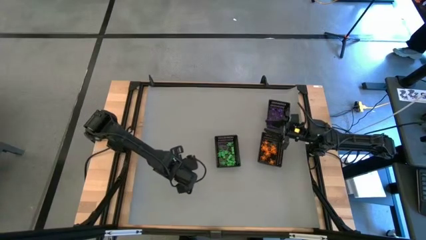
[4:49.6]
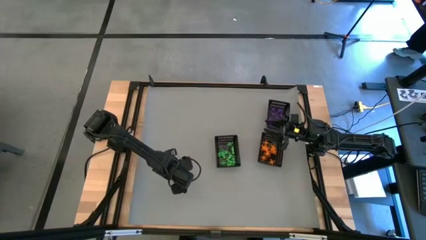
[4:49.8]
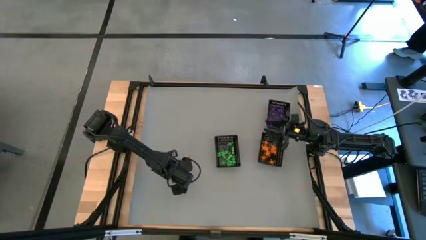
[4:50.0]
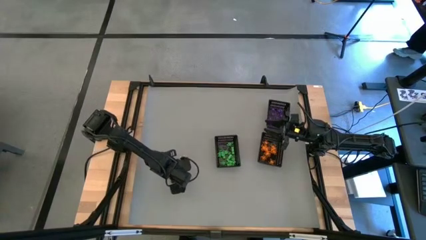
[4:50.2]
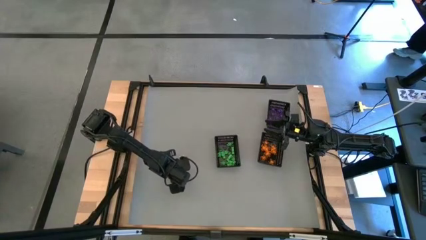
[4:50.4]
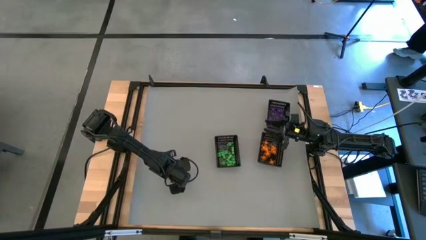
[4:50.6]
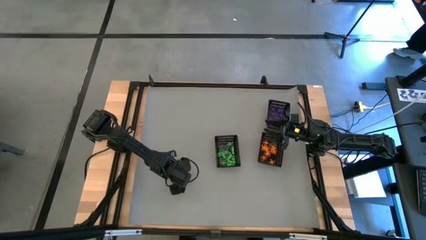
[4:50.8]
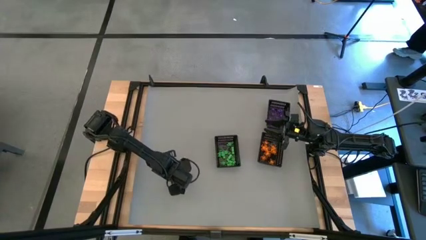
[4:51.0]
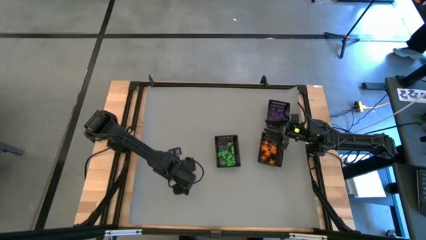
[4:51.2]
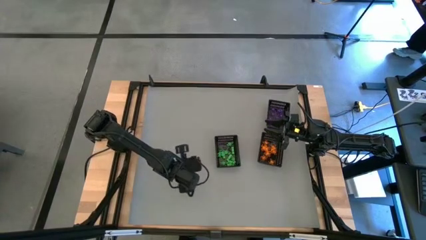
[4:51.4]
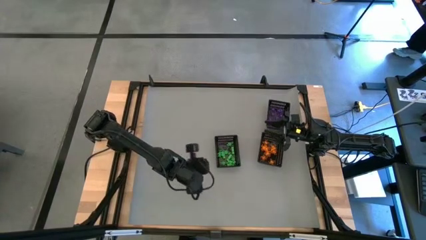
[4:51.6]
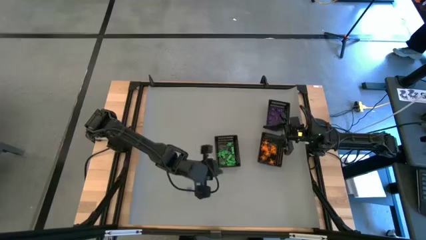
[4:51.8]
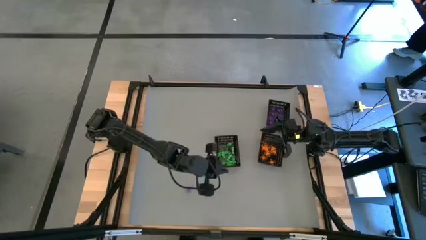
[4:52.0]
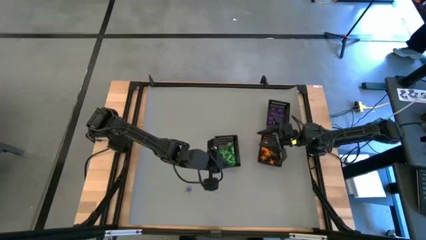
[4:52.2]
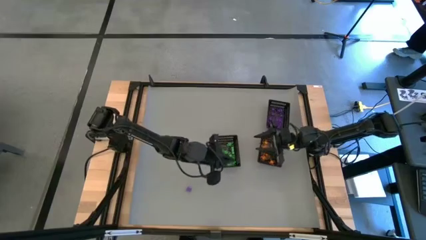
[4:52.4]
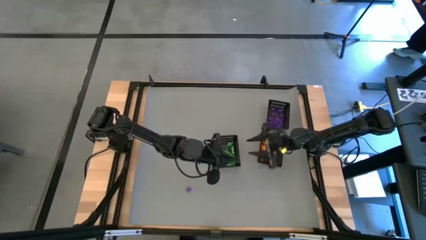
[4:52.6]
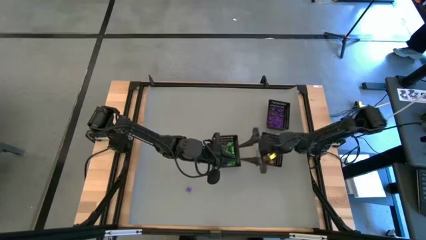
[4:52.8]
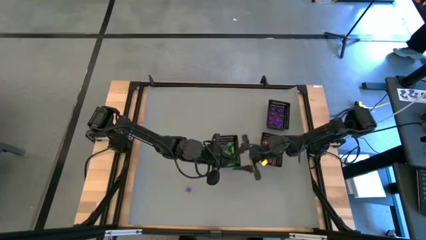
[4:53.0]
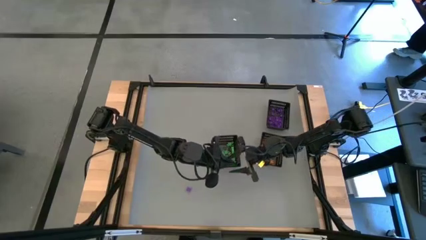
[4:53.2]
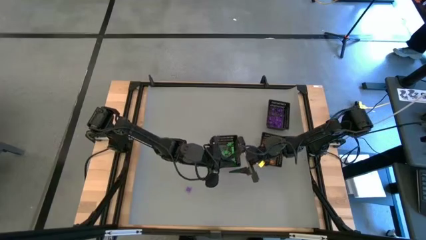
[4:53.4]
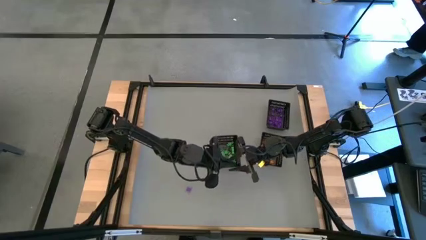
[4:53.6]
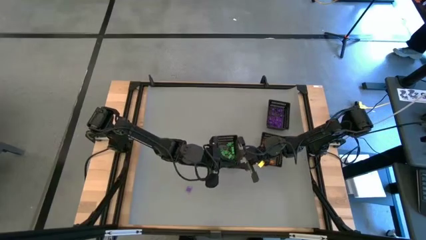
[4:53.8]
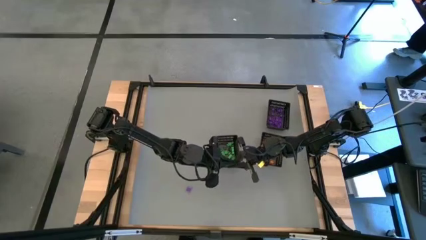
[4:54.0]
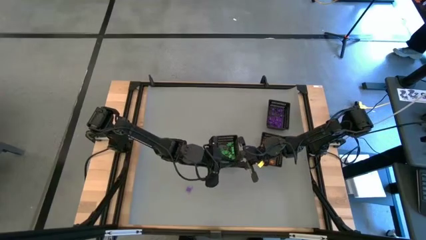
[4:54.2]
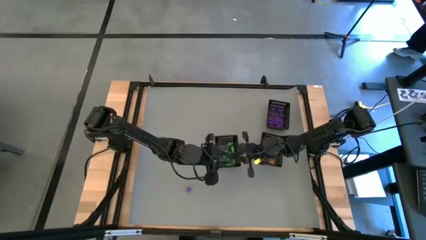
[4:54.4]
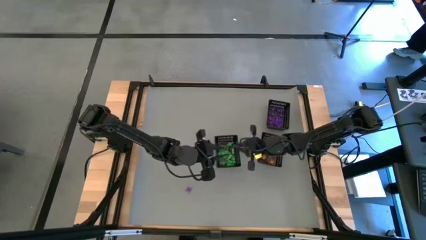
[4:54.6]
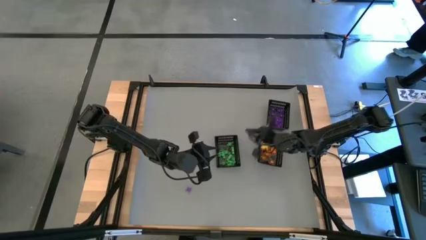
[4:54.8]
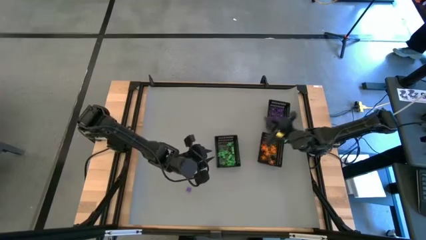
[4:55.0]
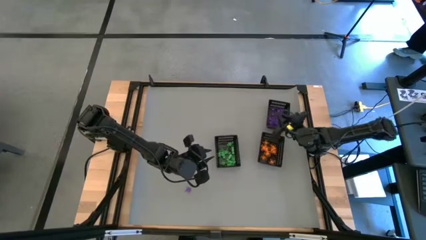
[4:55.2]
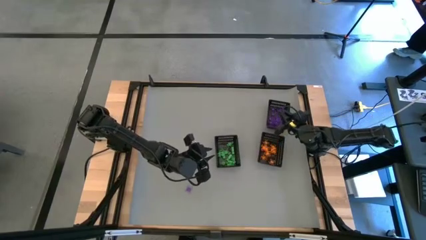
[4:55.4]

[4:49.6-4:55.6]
Task: Sort Halloween decoration
Put the bottom purple spider toy into the top bin

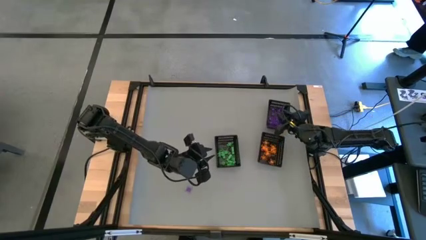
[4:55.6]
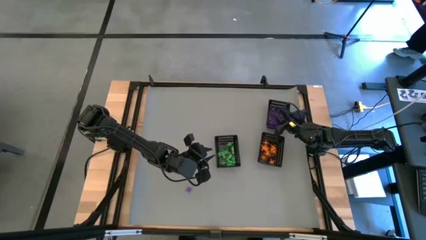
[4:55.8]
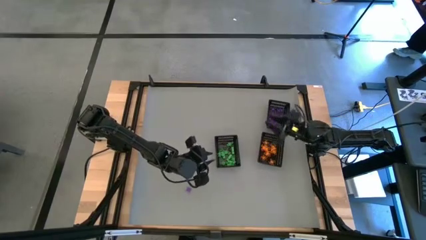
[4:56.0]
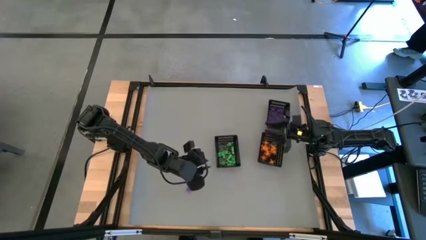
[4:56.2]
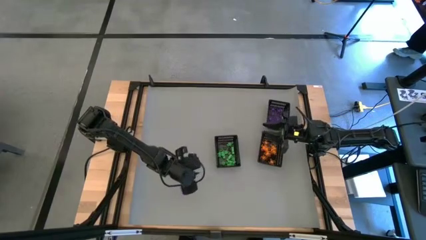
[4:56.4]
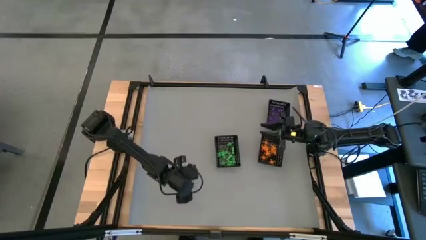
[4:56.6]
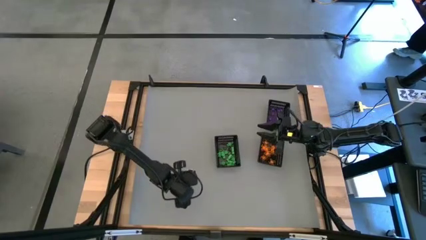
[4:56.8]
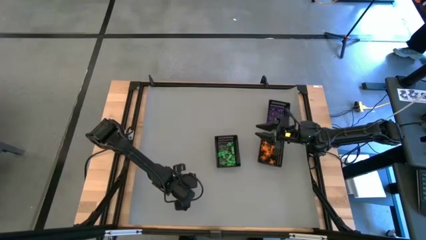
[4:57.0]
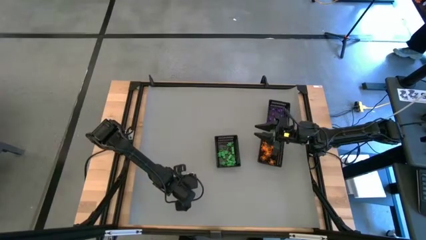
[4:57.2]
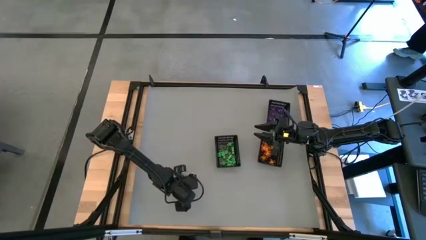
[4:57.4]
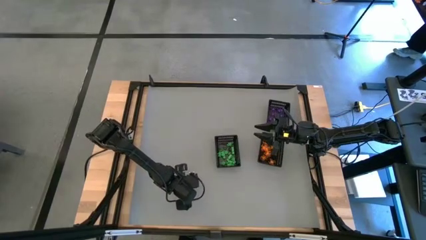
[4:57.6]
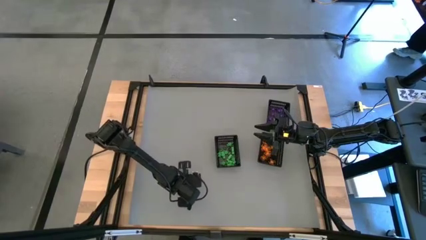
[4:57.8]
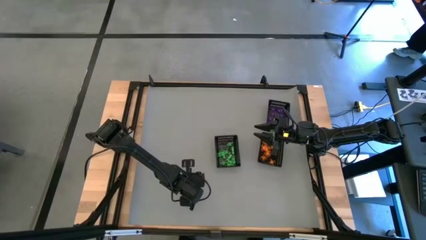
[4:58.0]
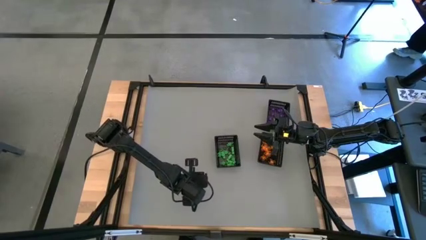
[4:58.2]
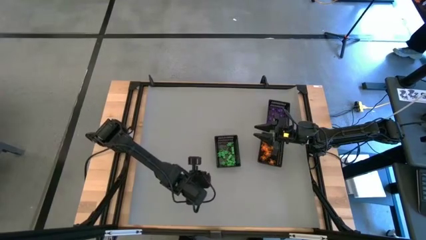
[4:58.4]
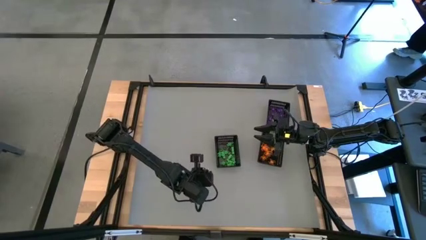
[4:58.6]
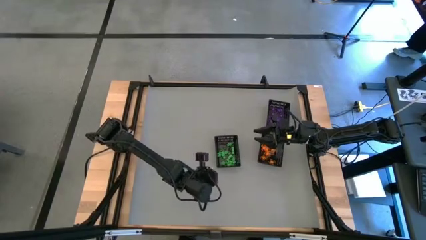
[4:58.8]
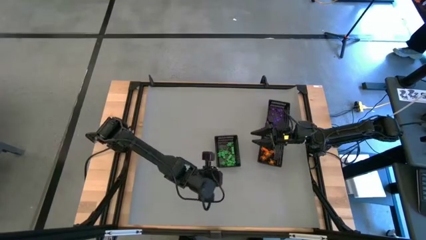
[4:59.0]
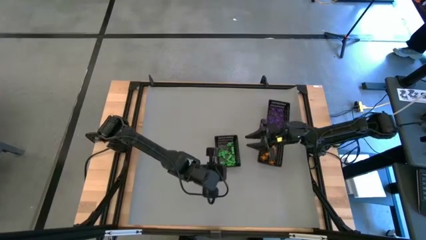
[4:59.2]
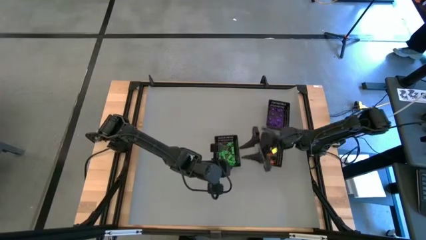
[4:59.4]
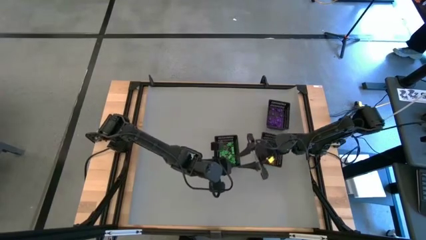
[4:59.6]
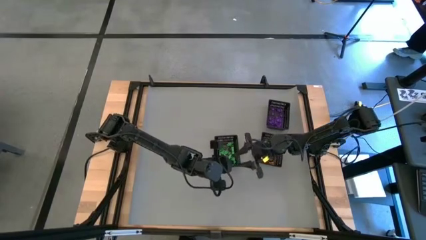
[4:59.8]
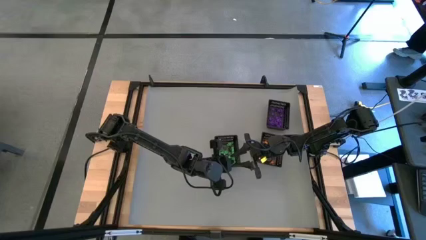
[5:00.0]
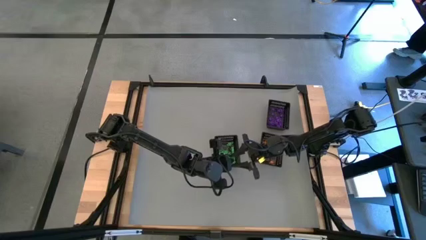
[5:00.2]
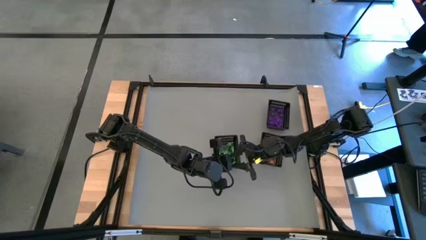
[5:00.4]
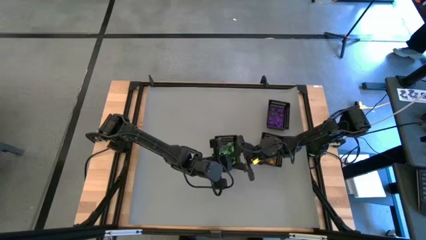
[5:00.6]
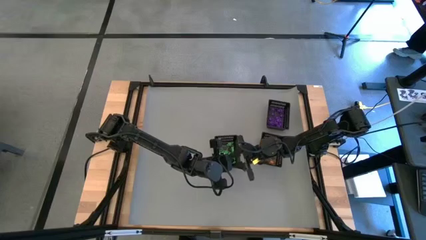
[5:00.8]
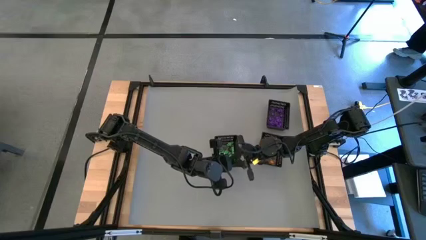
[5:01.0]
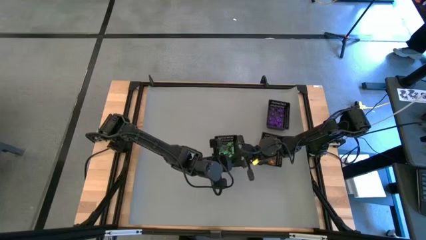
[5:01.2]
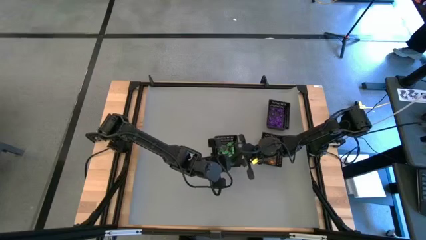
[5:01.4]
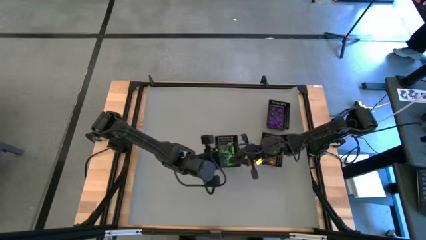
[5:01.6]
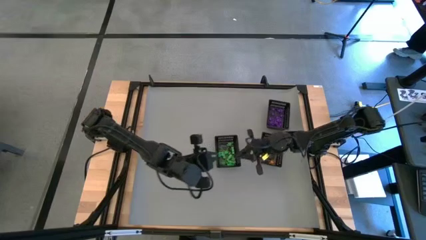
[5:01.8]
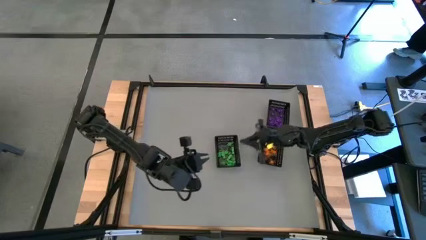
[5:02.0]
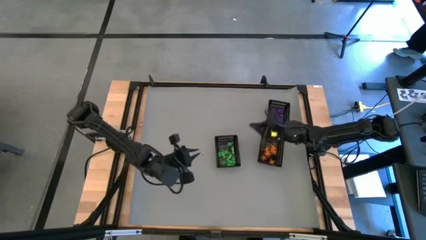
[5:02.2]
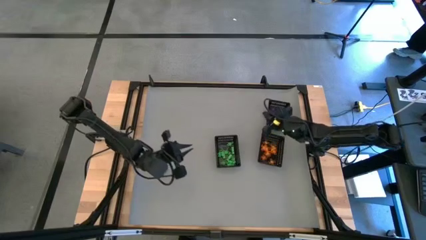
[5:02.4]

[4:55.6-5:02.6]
Put the purple spider toy into the top bin

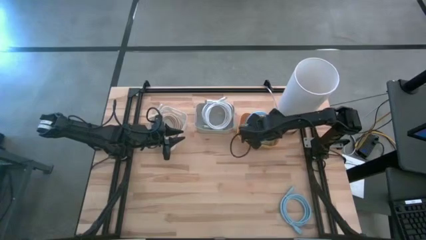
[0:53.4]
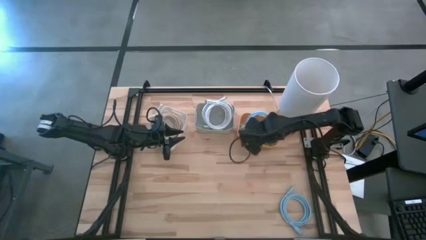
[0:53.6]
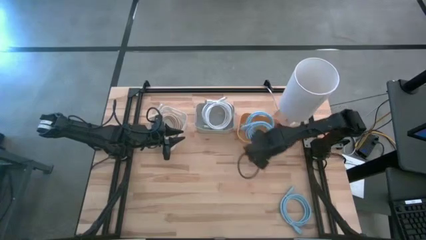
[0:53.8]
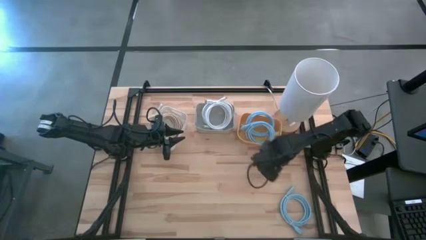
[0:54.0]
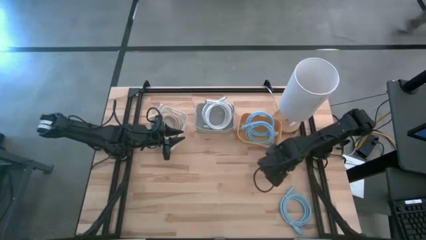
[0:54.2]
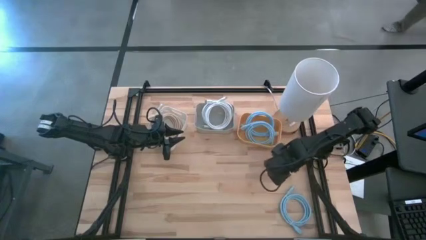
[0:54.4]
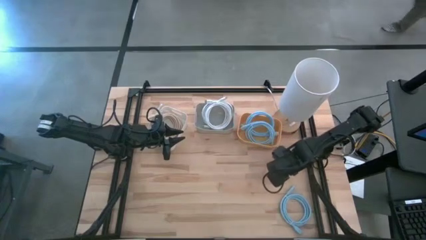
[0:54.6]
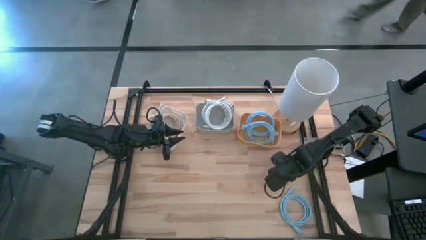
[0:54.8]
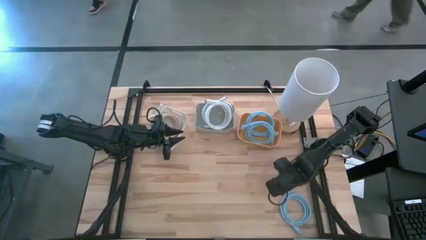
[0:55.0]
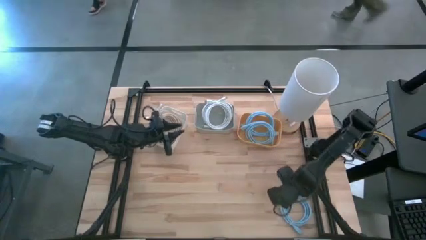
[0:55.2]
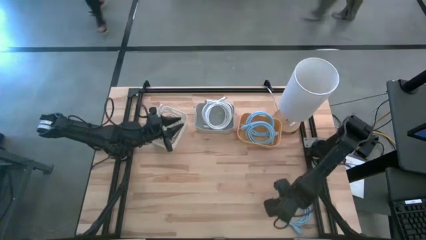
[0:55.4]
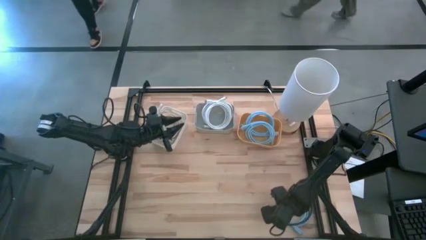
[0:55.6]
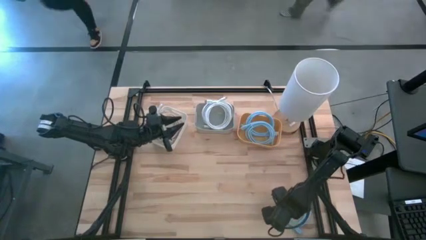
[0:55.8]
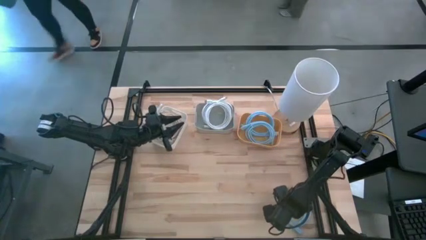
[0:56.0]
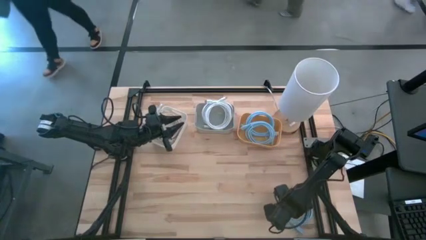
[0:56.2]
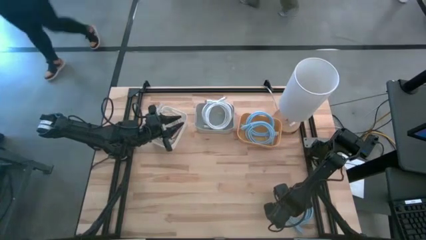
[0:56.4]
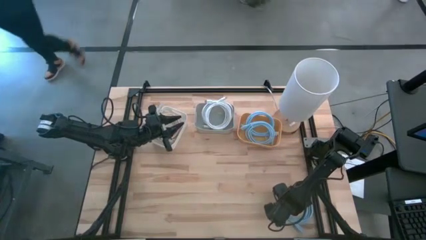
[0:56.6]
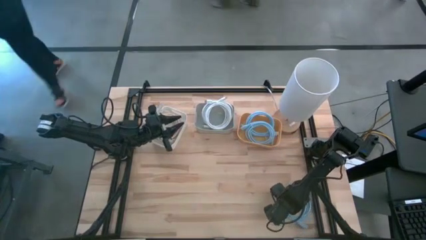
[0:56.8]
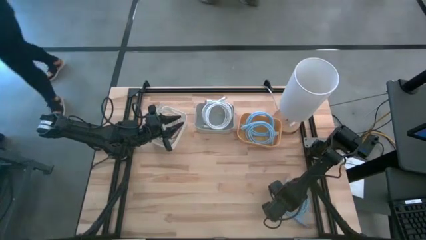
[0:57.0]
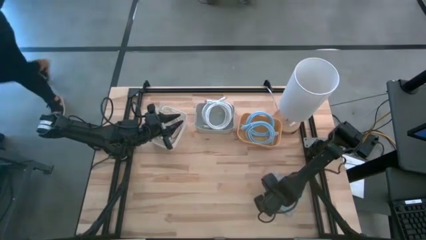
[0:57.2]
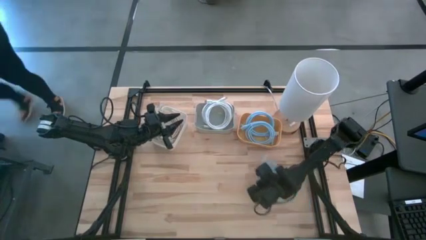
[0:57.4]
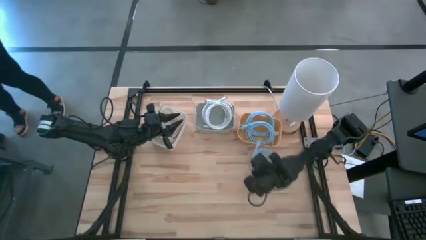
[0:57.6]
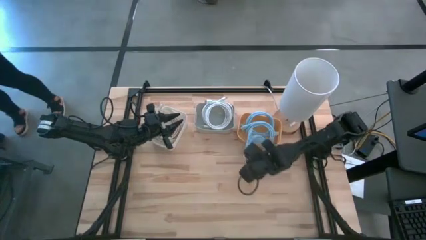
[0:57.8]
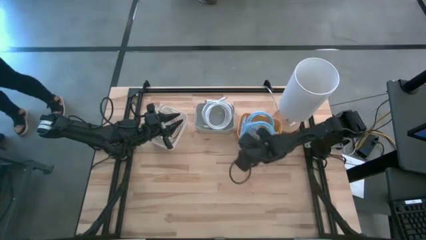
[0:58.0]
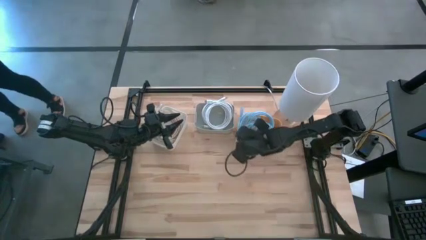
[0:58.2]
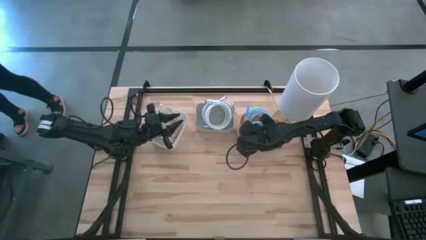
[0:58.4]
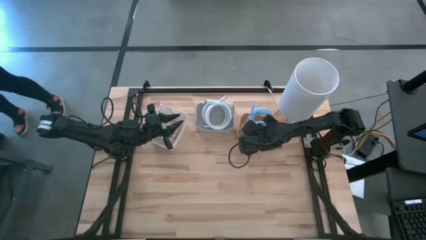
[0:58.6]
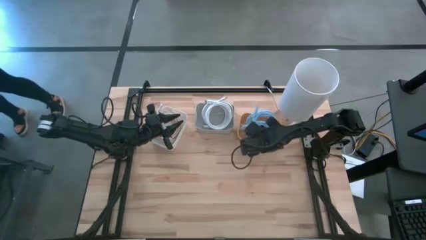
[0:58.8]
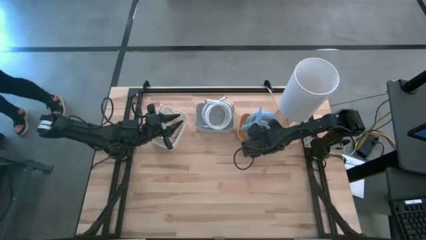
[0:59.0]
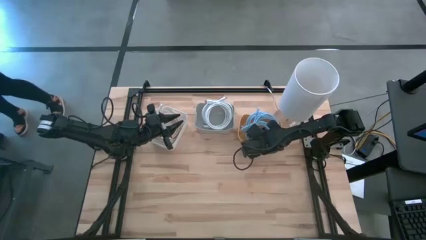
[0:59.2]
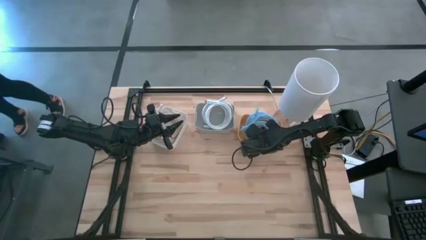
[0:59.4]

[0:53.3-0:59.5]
Task: Sort HDMI cables
Put the blue HDMI cable into the orange bin
